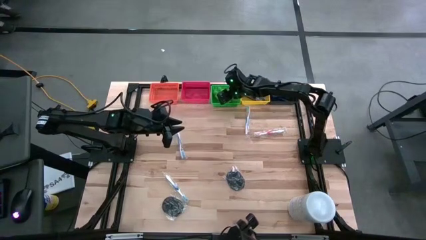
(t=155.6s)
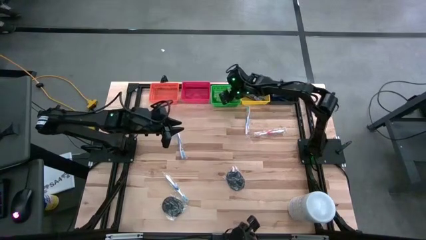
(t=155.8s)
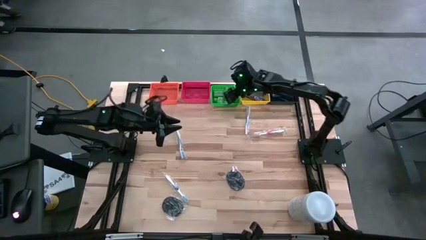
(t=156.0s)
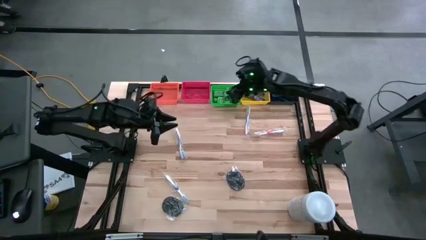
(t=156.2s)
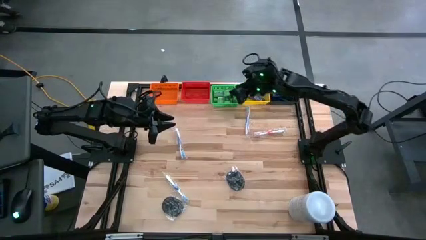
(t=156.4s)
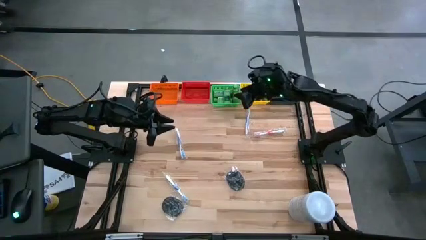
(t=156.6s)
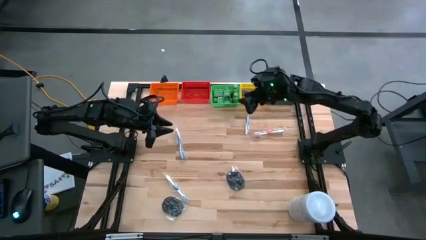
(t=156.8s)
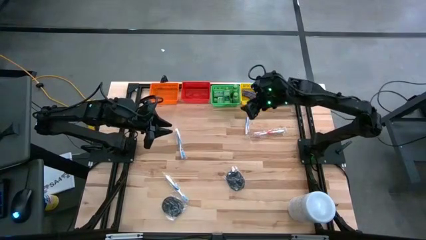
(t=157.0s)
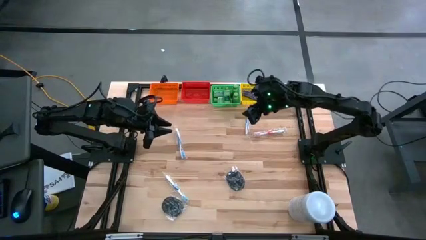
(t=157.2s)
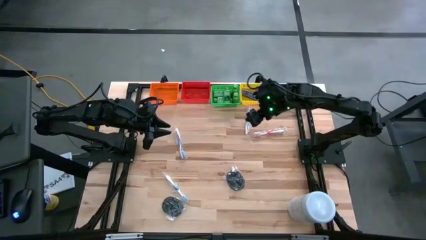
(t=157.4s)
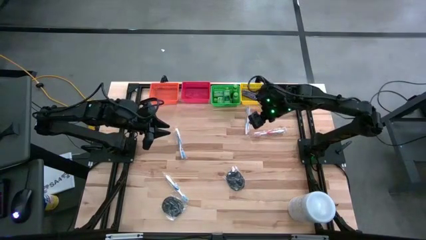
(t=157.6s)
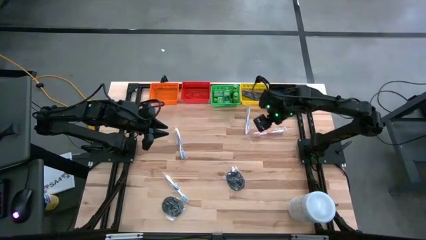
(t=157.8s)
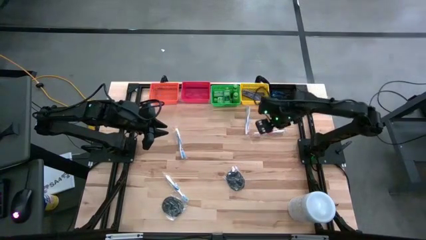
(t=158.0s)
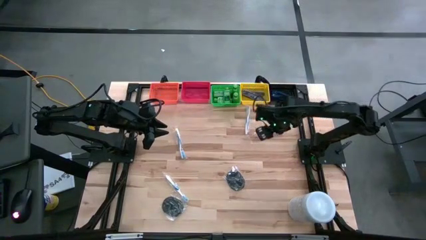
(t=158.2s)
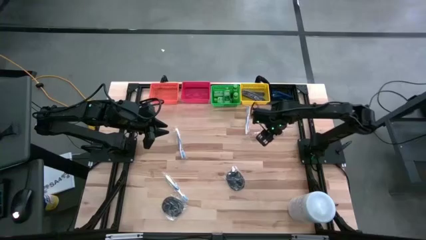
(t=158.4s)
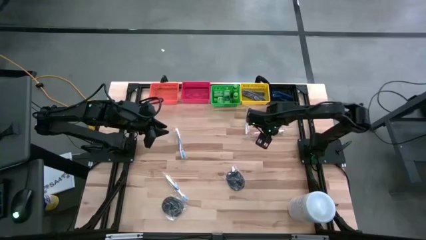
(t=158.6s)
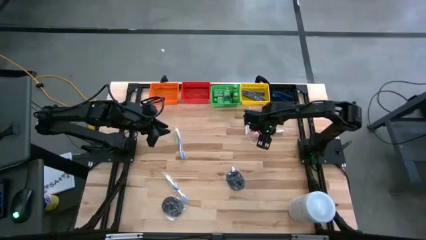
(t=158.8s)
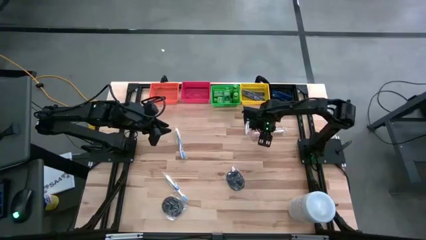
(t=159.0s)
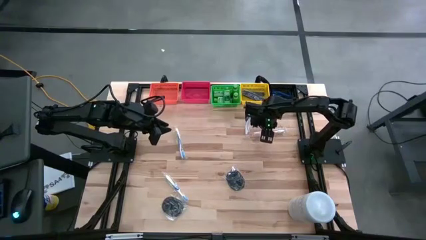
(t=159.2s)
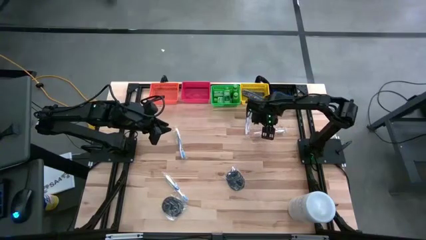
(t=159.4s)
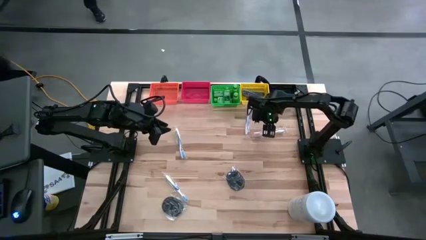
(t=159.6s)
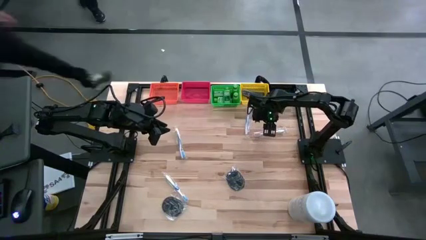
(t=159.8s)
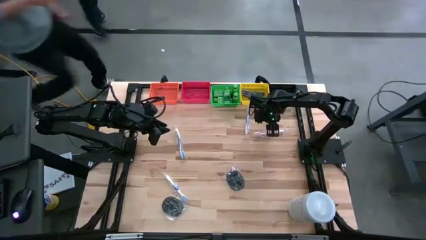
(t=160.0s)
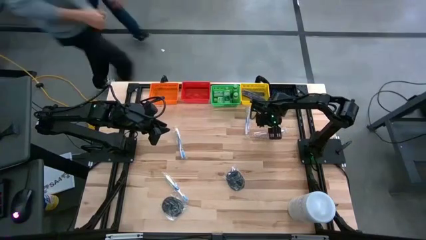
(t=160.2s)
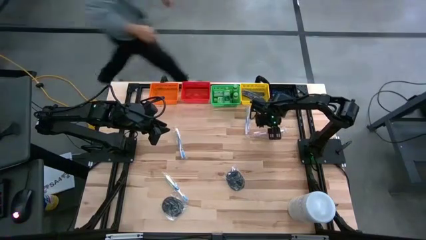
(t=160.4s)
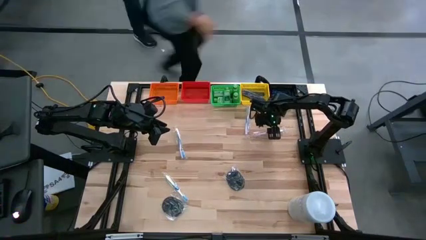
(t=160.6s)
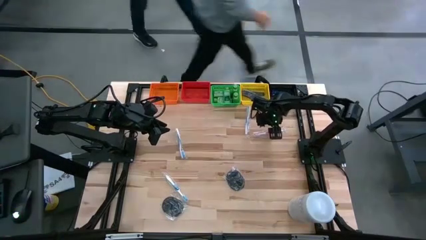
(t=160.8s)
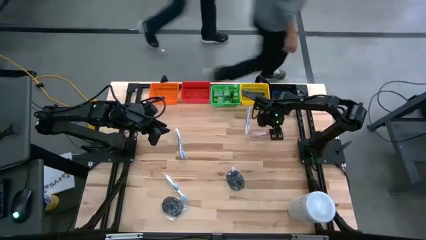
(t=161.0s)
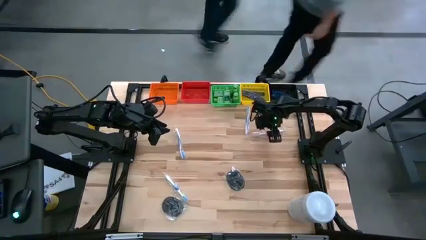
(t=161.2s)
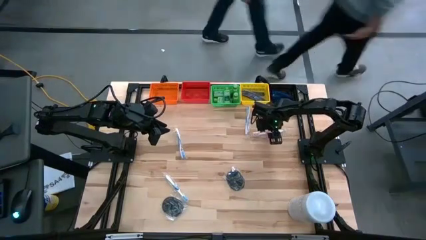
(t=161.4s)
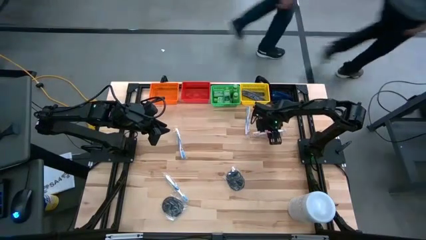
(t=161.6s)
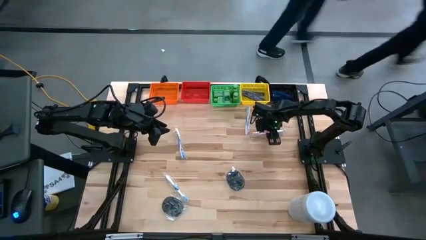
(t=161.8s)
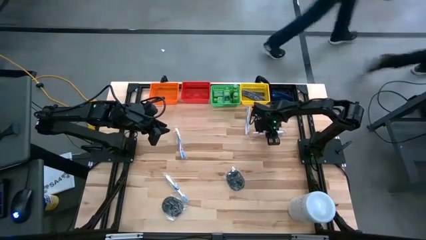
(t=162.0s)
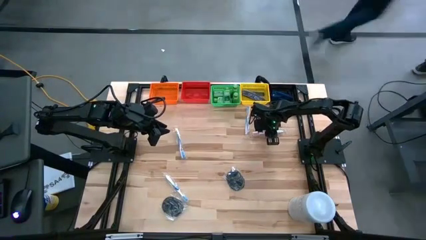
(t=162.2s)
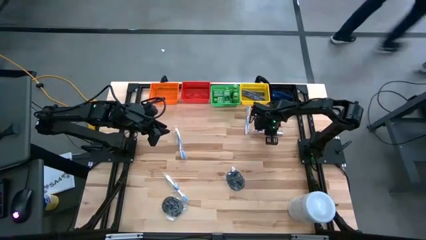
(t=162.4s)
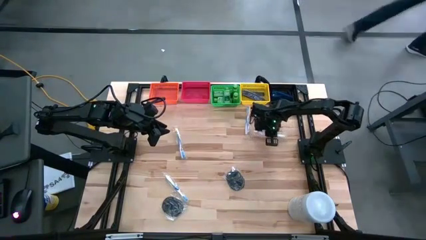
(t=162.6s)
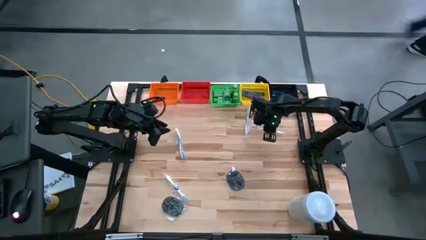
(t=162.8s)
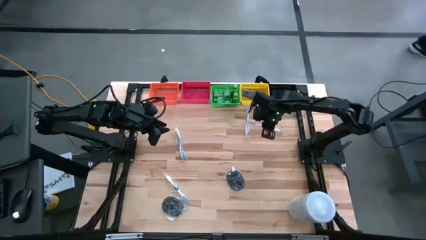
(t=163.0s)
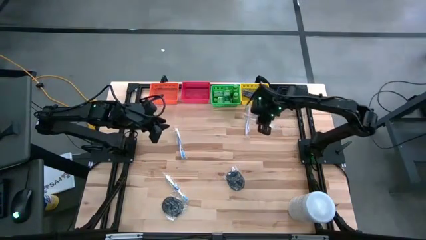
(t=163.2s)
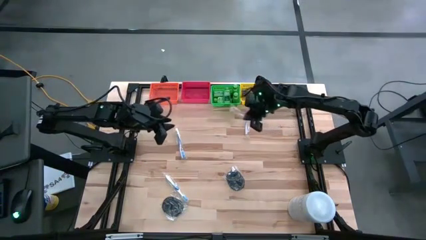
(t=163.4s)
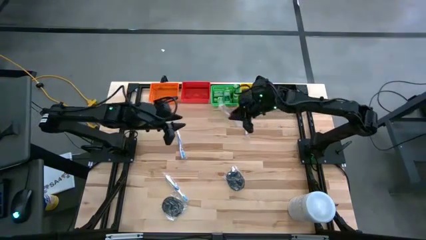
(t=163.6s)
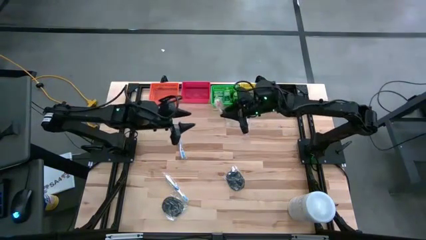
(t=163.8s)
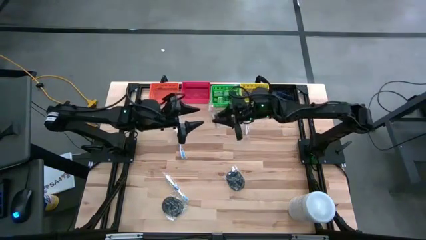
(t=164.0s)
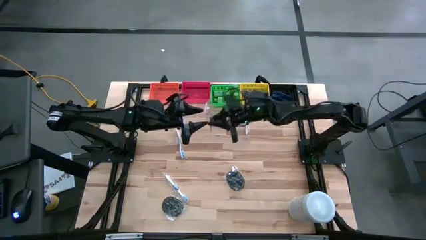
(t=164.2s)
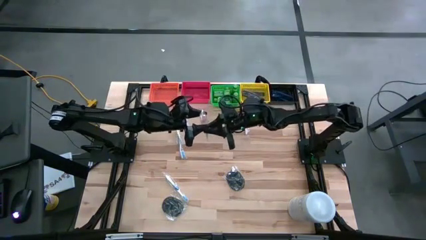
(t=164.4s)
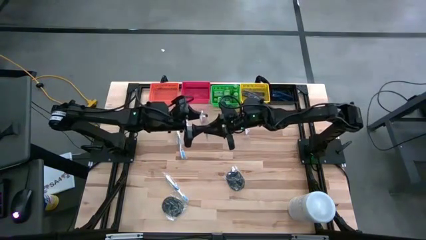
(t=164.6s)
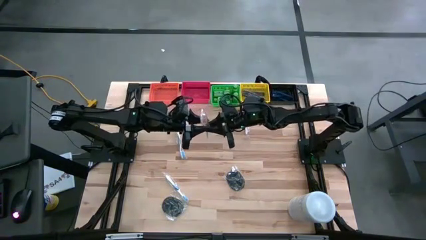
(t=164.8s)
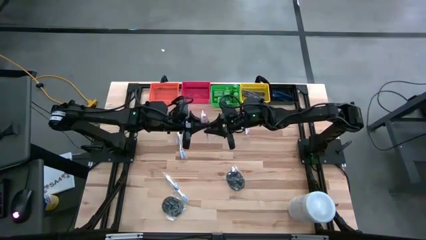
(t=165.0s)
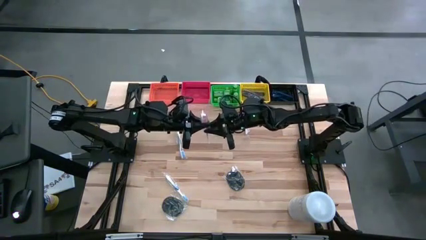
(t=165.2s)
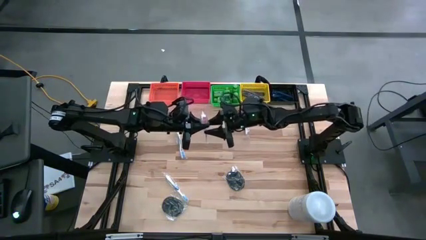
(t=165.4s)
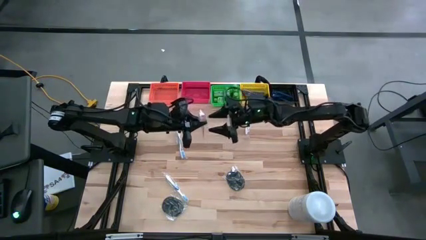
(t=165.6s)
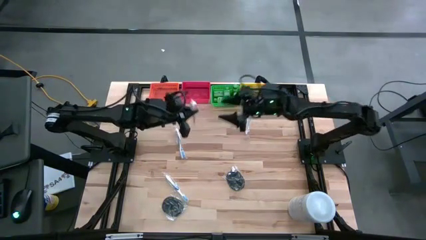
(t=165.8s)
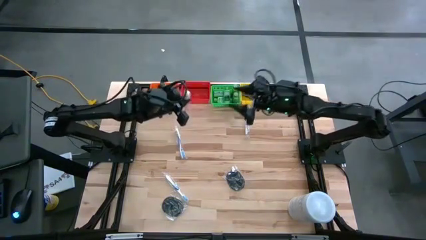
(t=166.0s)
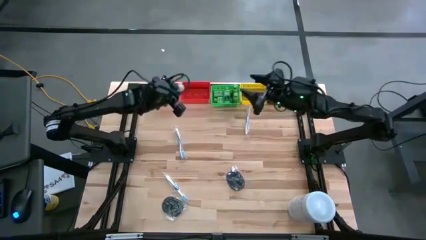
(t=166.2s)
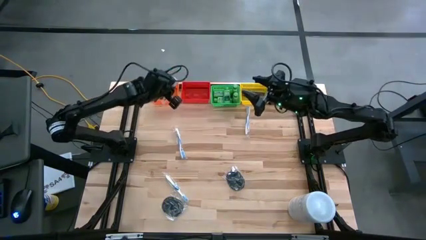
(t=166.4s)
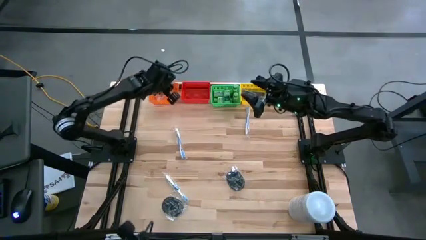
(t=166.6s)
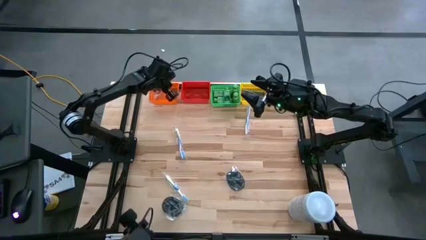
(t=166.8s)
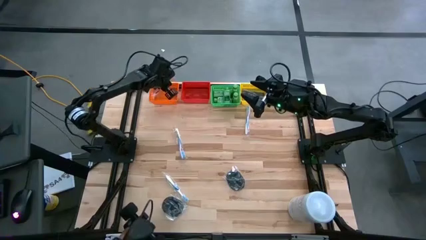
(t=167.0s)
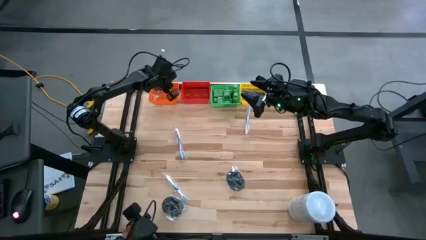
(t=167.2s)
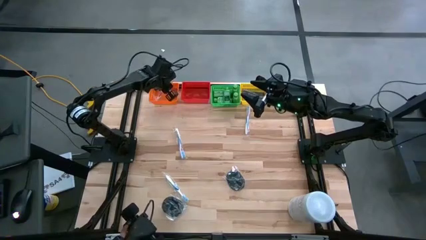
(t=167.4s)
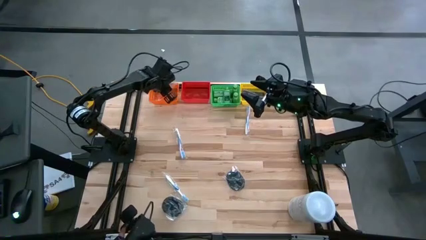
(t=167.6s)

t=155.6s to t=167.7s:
Task: Pick & Place Travel size toiletries
Put the orange toothbrush into the orange bin

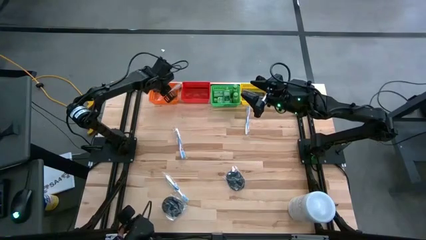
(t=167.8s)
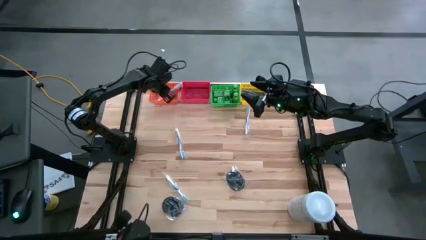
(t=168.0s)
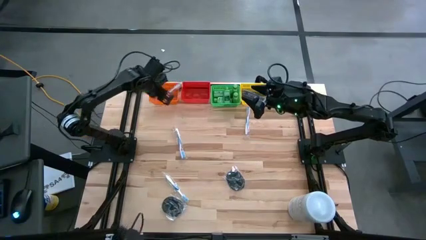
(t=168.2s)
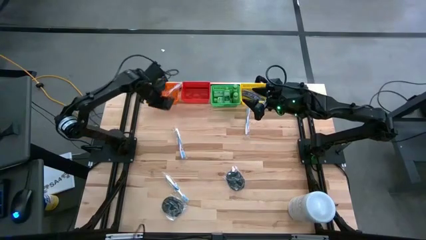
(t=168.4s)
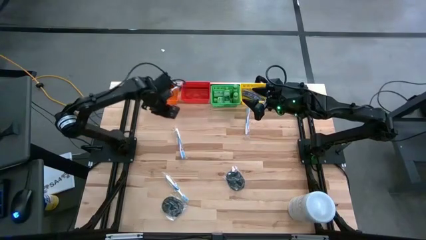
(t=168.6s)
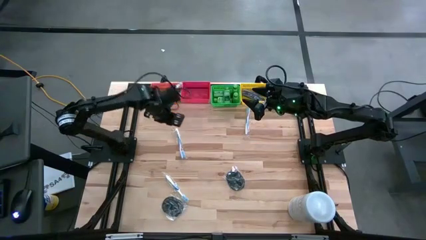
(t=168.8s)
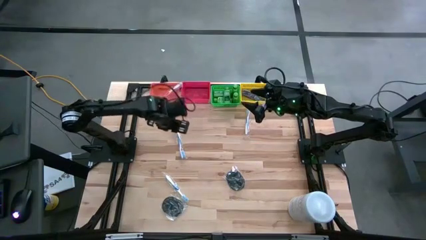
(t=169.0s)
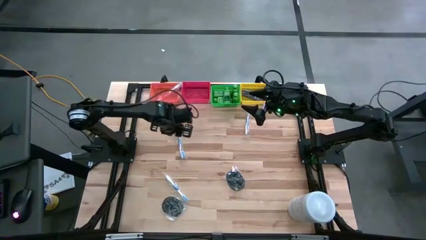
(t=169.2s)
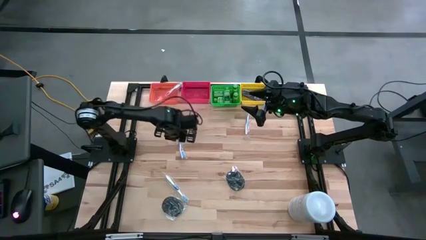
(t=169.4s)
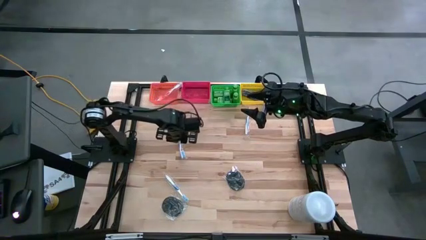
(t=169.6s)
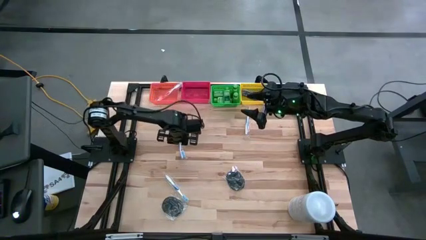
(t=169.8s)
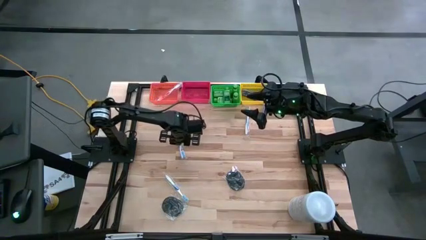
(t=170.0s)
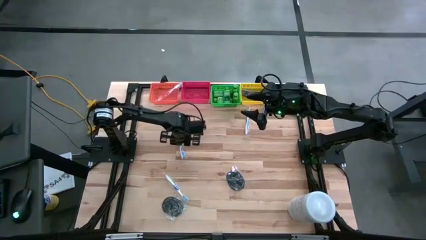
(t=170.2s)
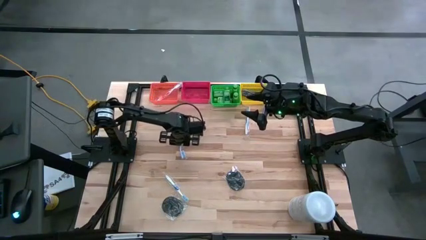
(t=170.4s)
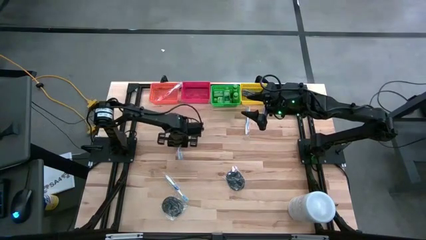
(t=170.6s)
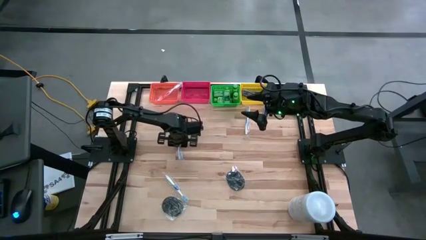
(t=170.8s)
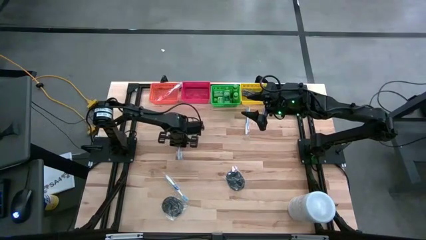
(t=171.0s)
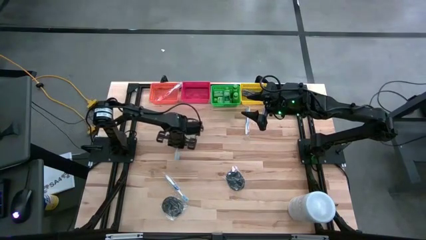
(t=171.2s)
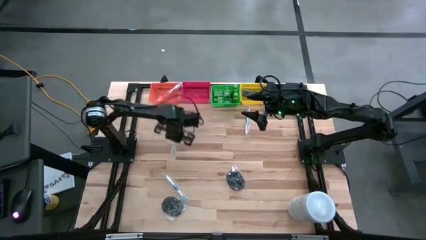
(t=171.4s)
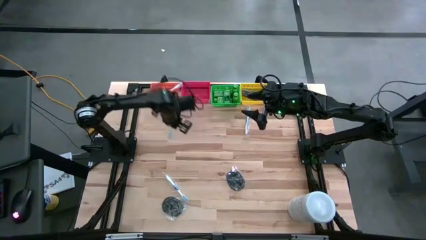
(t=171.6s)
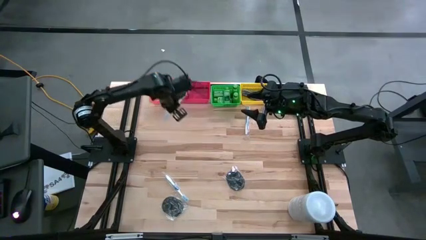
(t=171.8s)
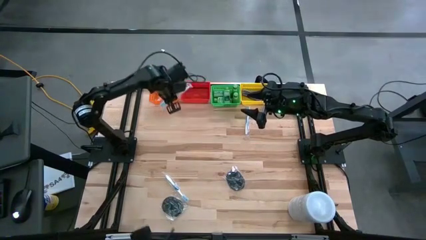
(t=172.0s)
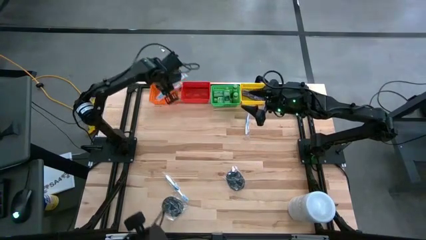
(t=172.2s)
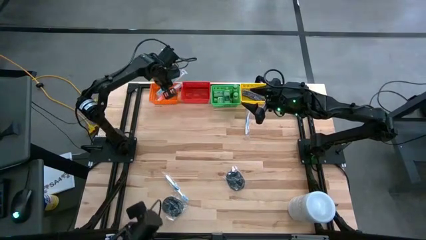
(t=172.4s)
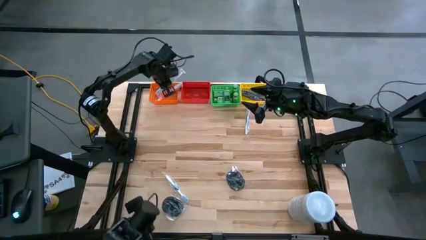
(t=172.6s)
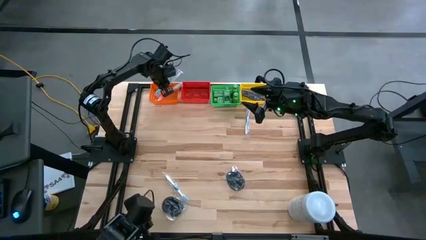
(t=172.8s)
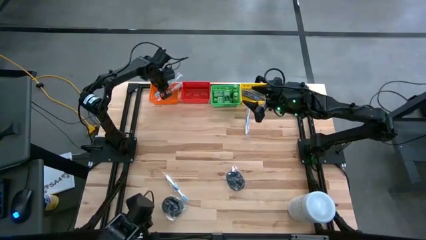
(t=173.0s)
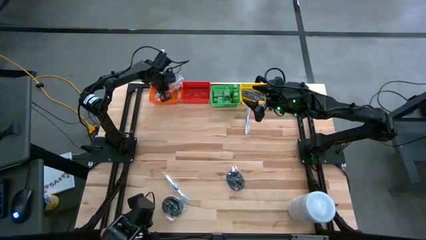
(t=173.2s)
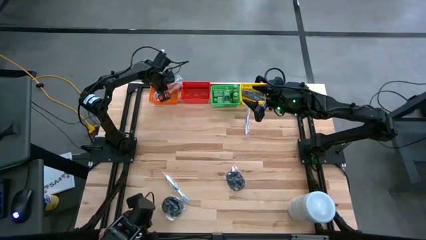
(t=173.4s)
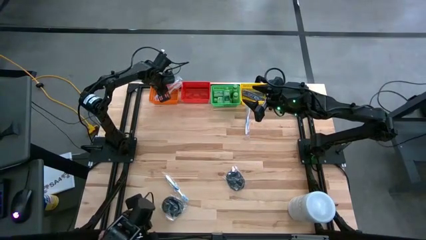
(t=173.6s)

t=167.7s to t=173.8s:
Put the blue toothbrush into the orange bin
